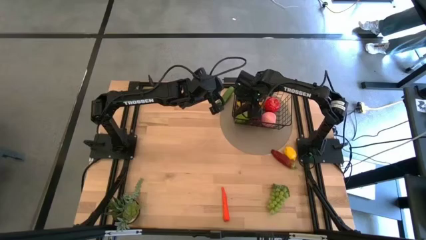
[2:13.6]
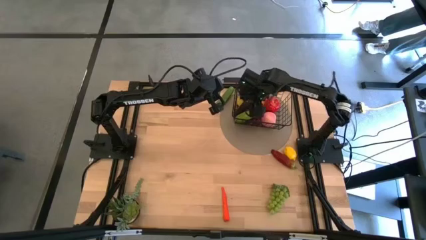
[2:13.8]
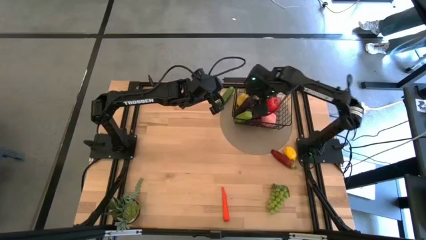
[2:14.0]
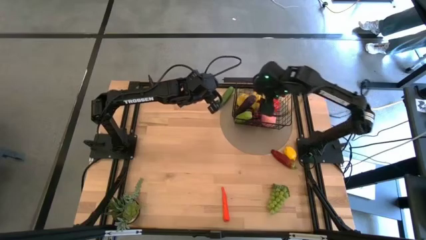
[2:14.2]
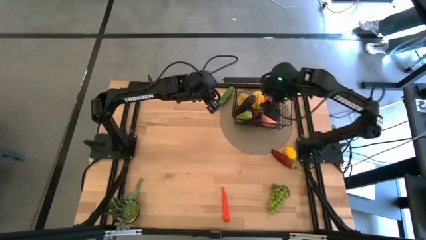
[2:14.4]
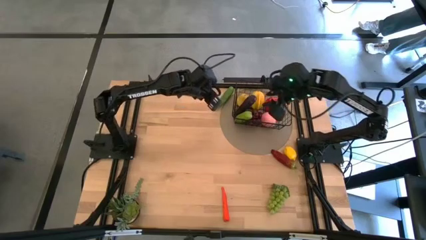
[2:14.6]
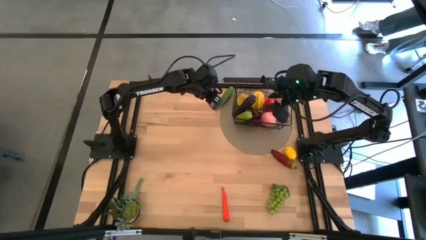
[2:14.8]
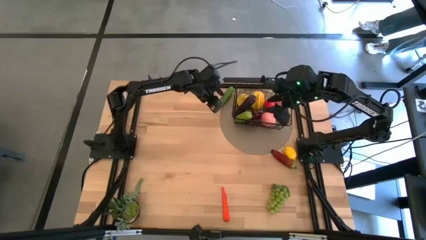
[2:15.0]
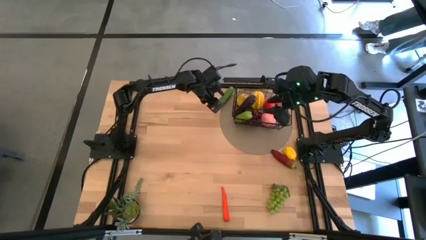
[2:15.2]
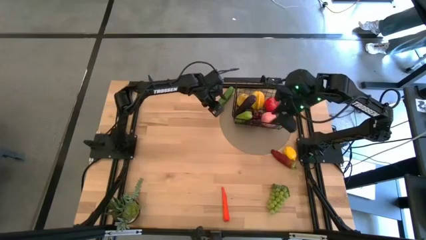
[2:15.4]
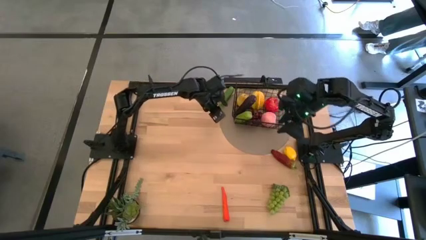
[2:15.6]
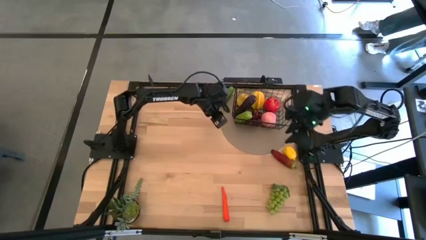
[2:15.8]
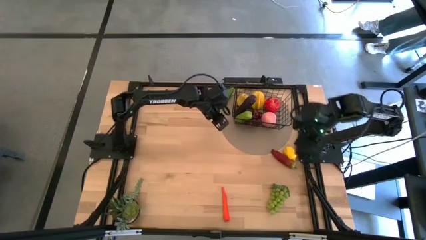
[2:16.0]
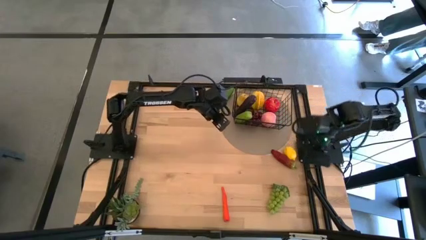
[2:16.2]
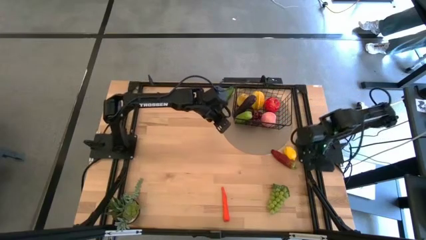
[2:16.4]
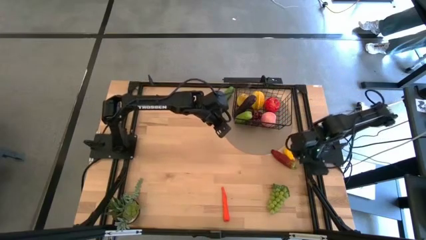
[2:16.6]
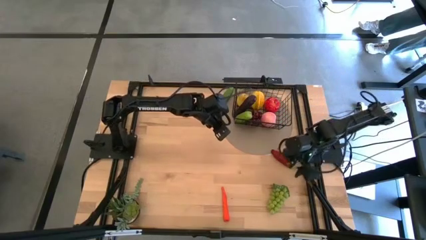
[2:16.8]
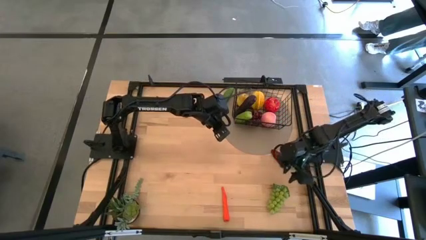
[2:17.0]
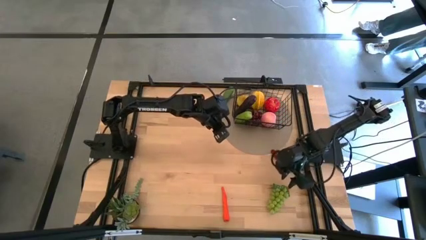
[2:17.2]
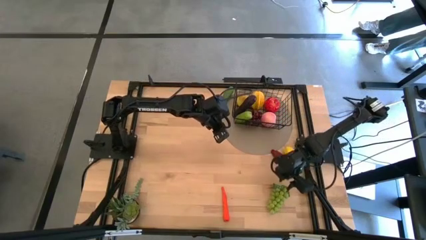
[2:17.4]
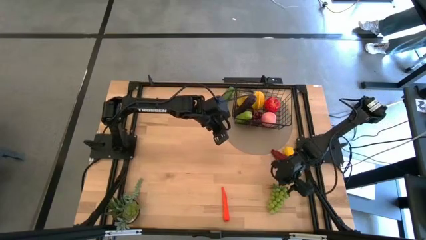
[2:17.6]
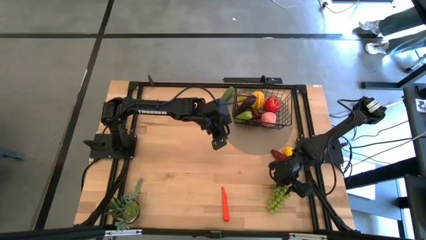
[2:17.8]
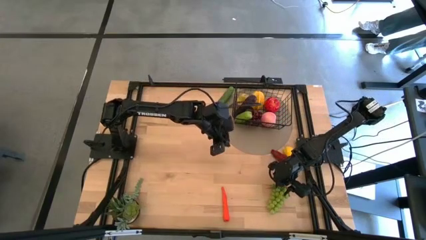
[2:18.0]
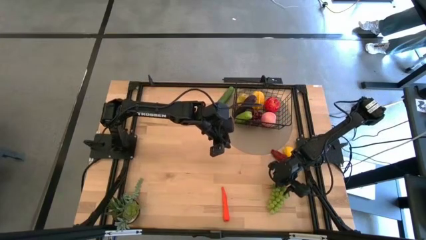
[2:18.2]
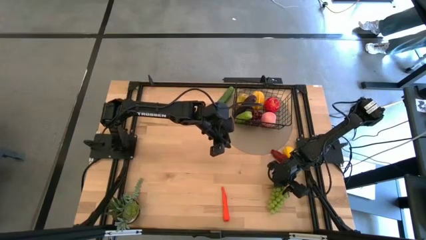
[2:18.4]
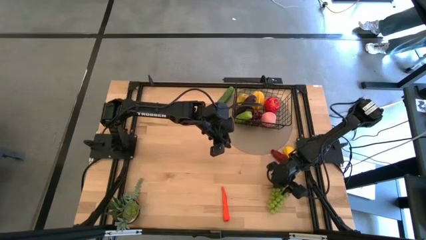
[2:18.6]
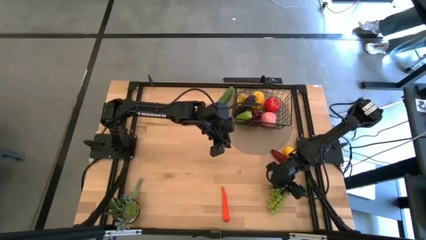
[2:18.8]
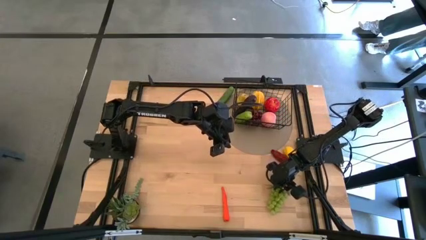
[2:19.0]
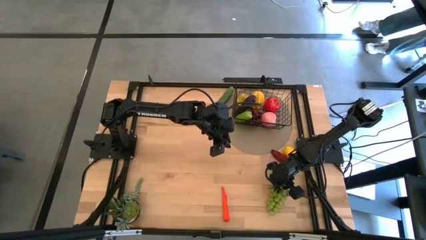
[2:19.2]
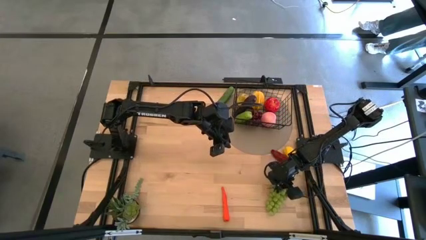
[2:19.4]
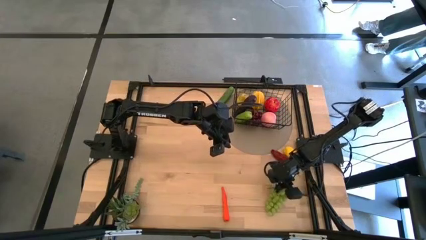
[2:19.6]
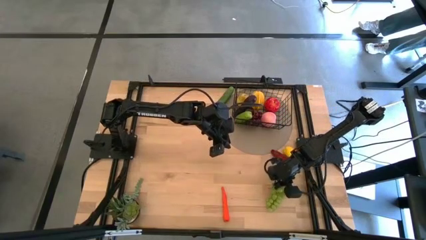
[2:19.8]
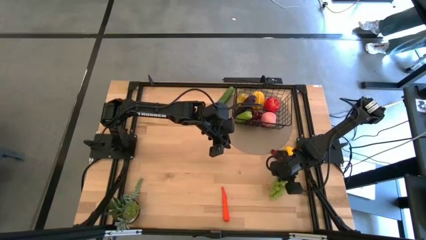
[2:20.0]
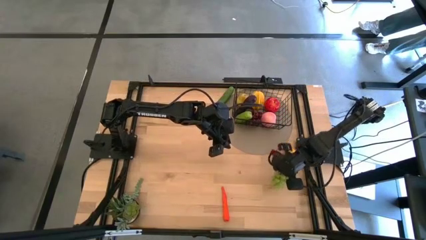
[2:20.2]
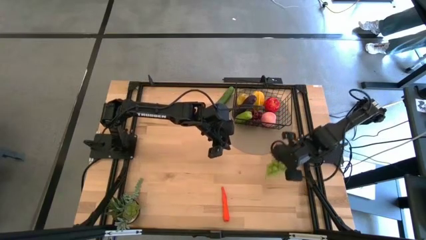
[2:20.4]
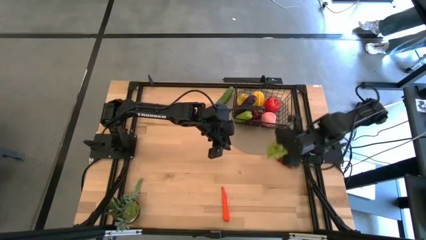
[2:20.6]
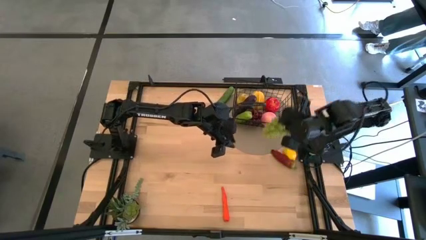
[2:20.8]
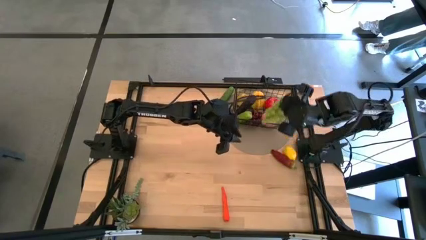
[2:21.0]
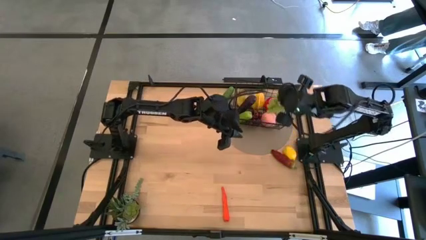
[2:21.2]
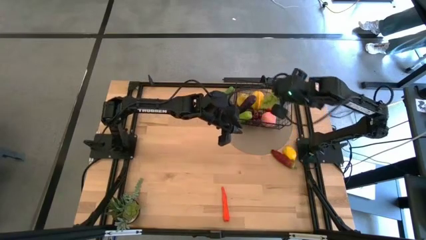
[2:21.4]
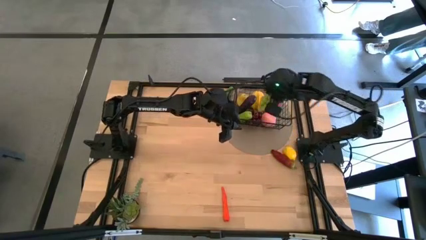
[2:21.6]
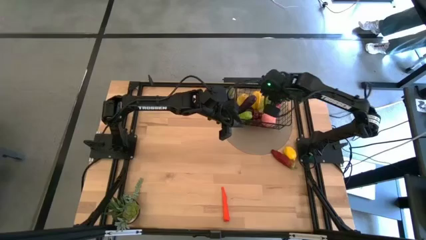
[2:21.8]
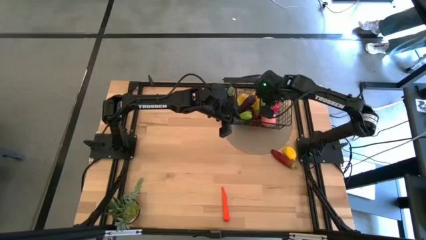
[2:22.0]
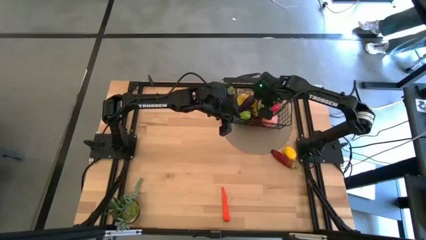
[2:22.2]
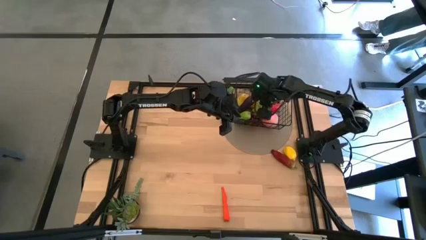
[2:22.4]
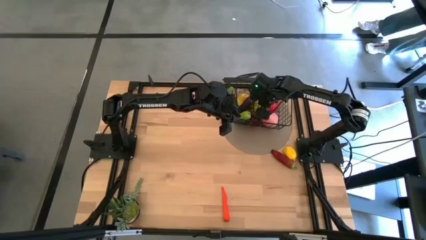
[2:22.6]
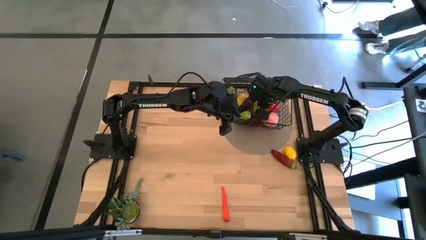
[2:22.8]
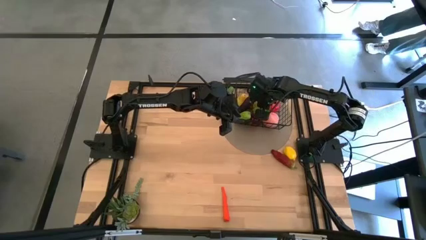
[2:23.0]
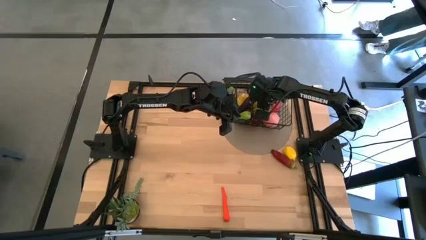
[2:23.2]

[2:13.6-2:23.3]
Task: Build produce basket
Put the green grapes into the black wire basket

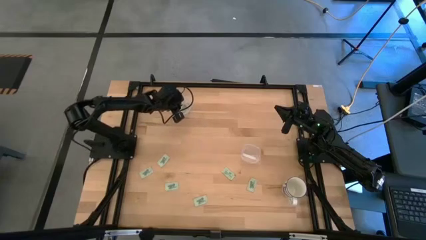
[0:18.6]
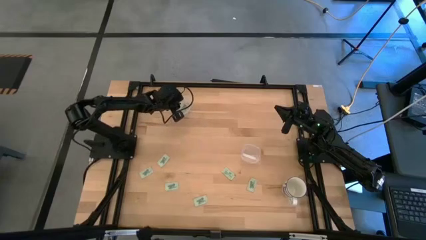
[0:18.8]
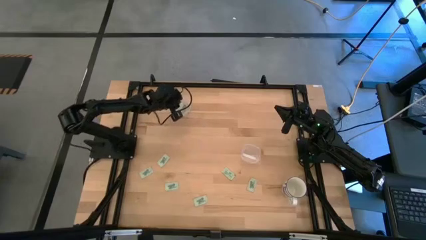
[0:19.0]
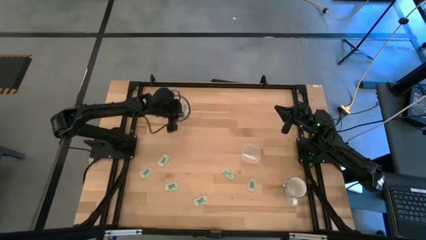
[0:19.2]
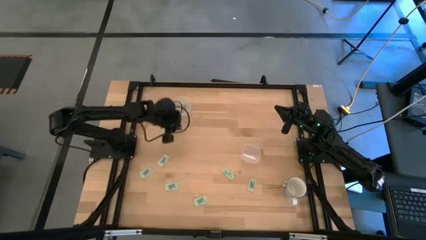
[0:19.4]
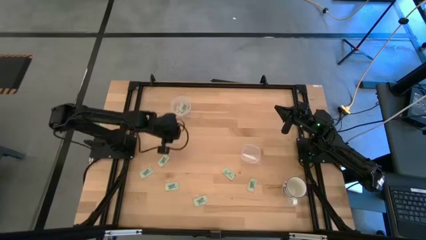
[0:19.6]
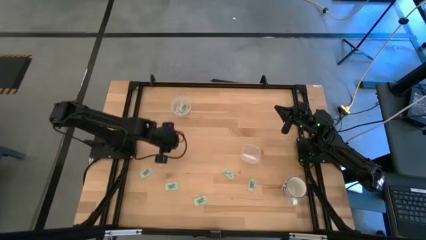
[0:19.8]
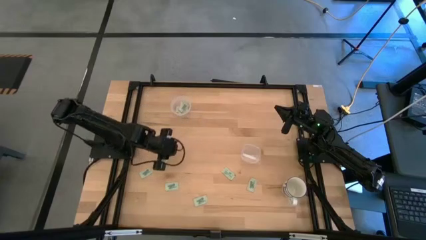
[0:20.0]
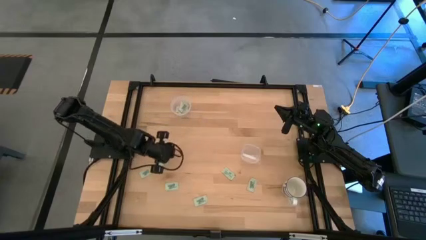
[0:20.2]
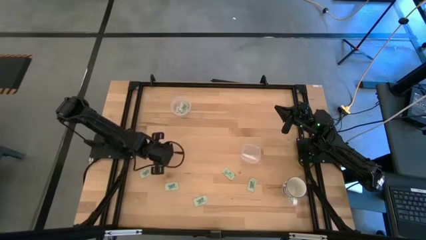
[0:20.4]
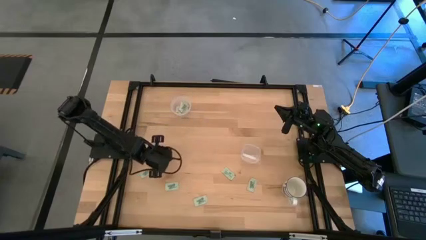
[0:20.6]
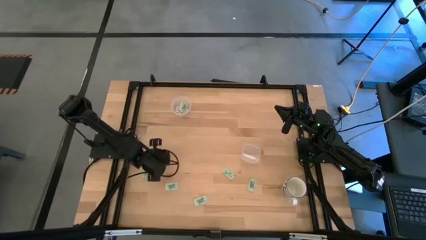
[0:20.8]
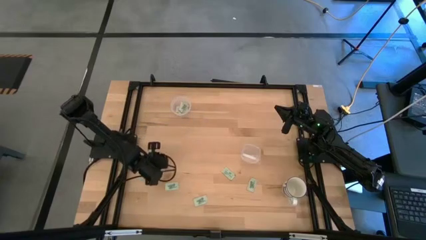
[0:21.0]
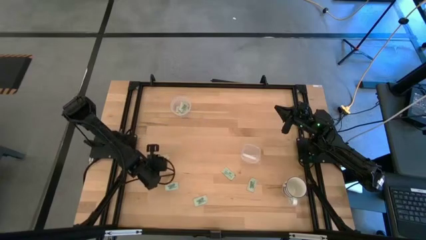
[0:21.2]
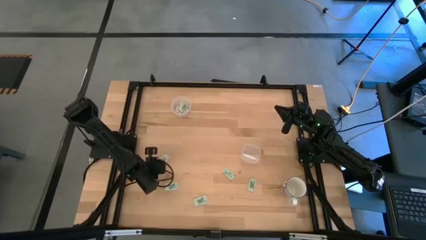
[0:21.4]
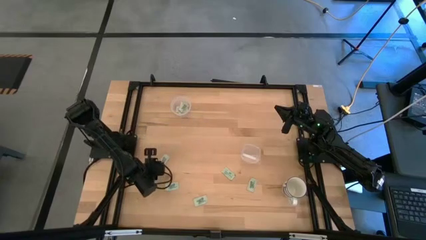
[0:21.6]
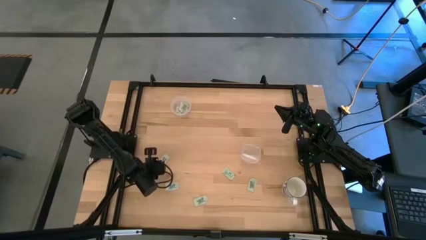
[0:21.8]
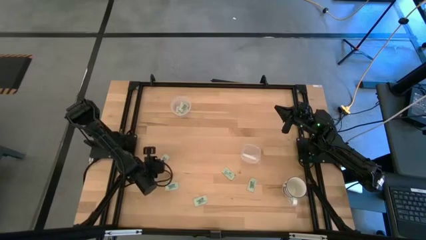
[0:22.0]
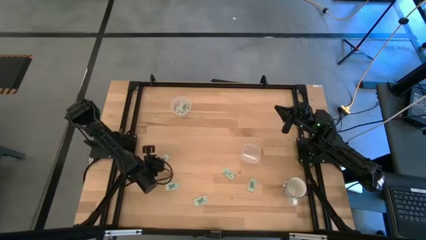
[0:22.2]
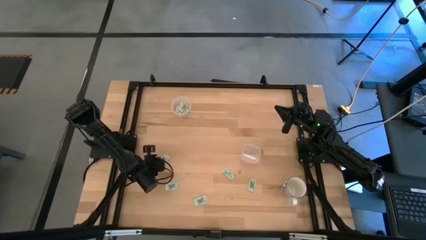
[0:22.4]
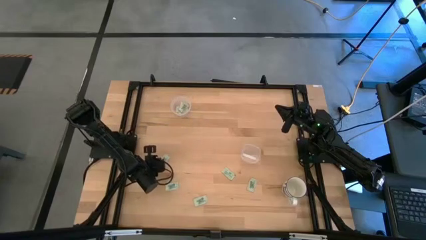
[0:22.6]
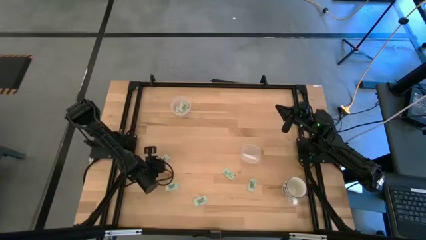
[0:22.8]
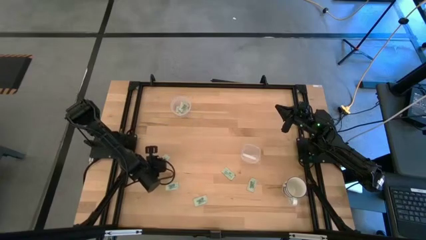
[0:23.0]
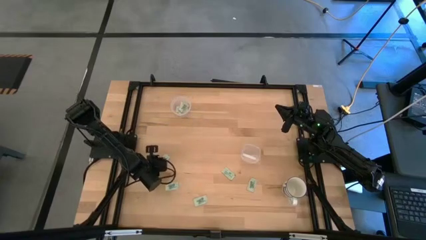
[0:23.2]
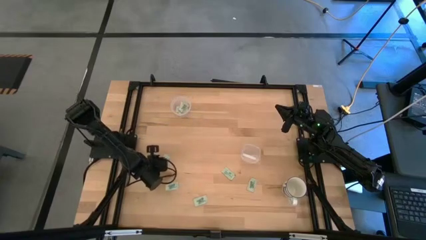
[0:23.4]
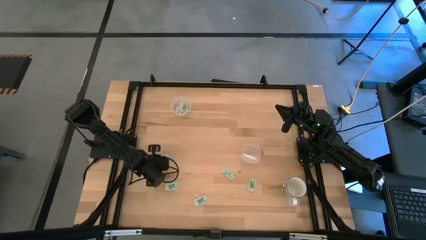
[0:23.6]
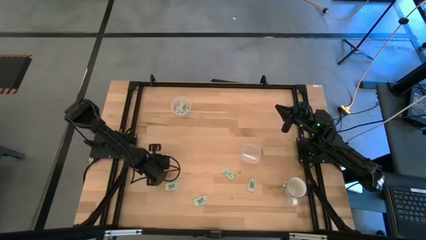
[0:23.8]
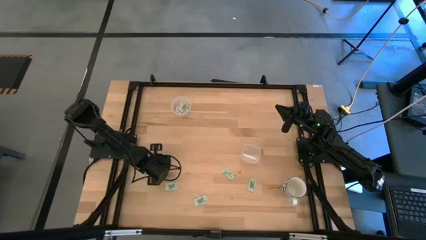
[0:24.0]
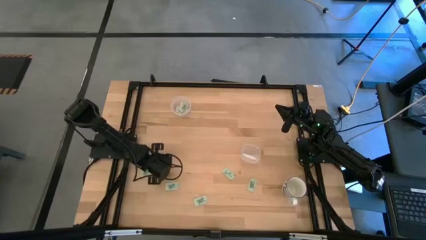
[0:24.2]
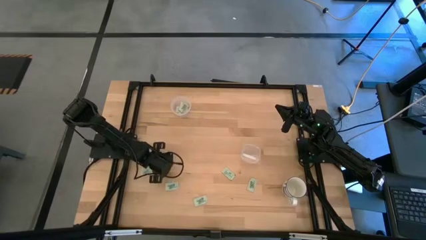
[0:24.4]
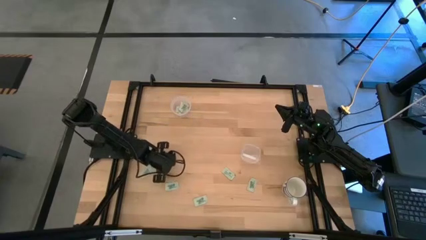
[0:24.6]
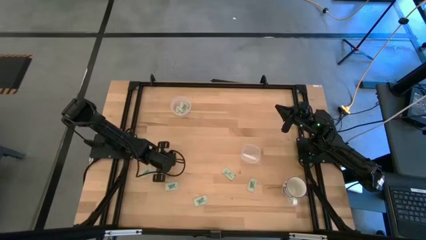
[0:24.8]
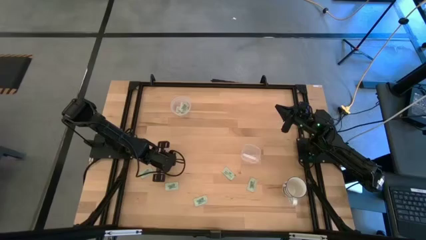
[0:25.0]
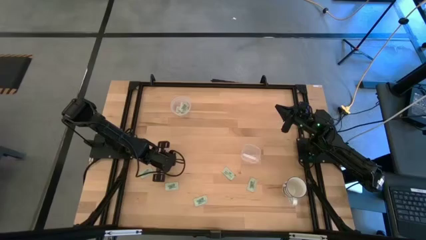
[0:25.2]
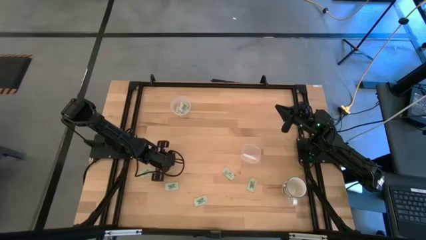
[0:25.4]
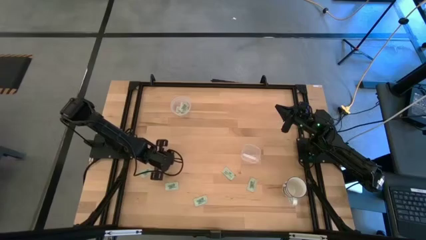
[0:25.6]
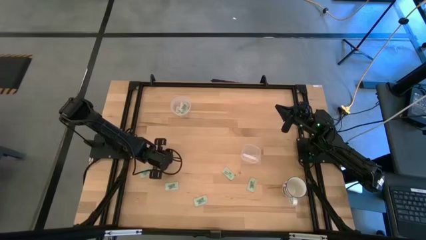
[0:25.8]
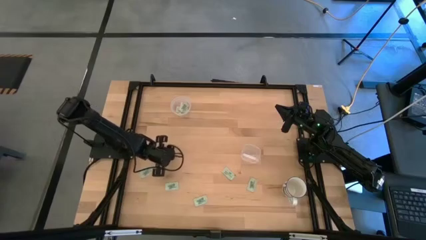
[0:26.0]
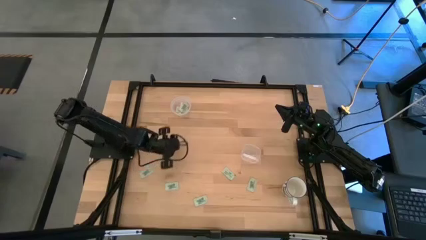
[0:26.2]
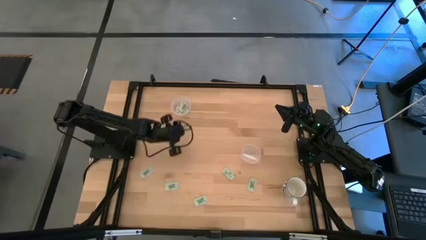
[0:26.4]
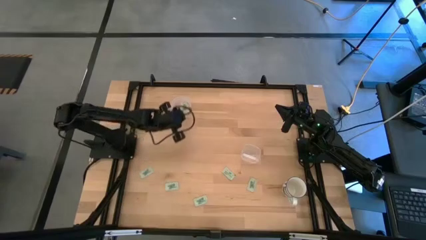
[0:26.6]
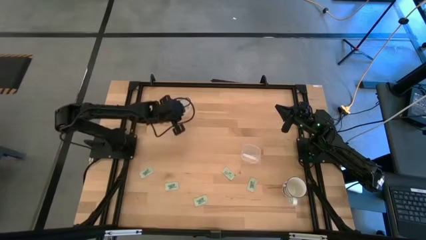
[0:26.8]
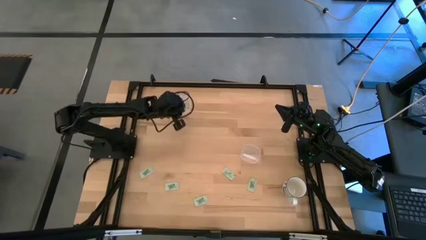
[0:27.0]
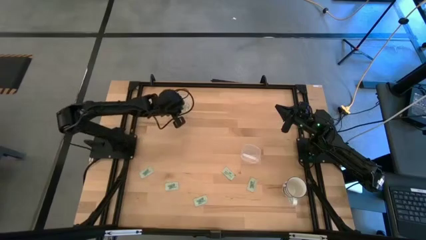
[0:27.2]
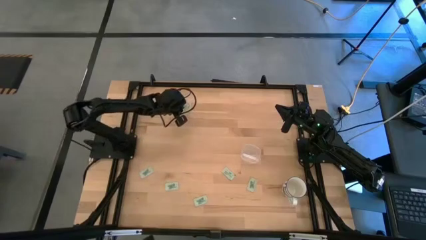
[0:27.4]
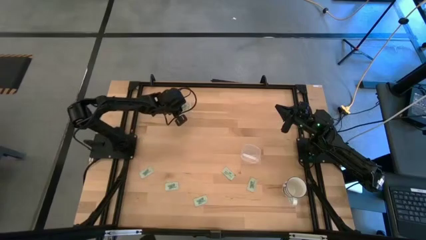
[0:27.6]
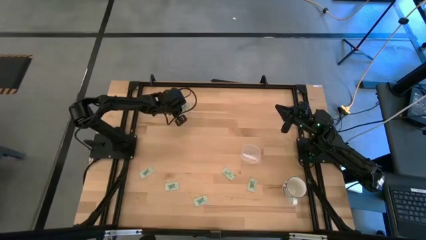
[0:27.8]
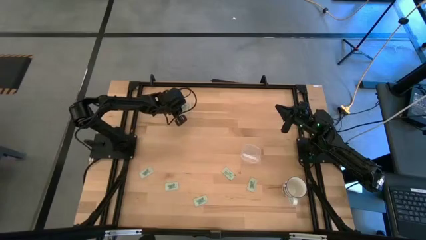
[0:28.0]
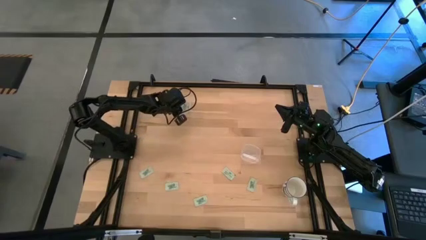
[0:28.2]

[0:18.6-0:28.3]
Task: Pick and place Stevia / Truvia into bins
Put the stevia packet into the top transparent container
